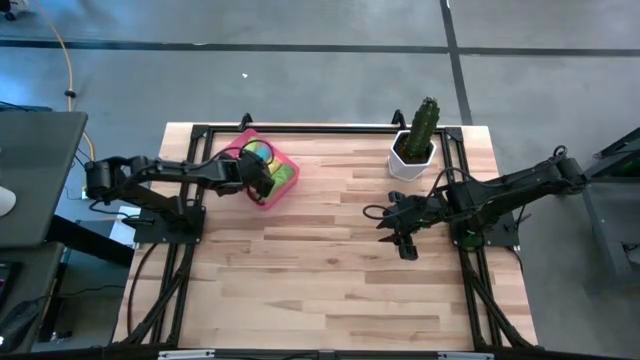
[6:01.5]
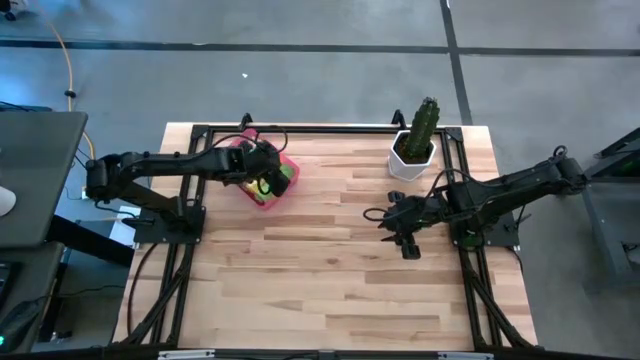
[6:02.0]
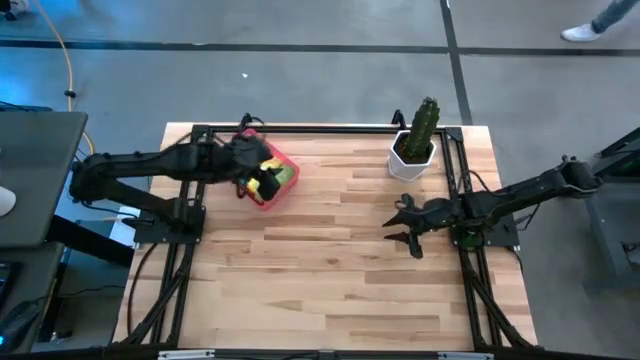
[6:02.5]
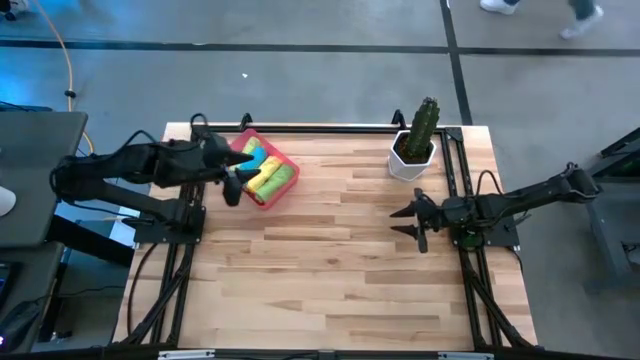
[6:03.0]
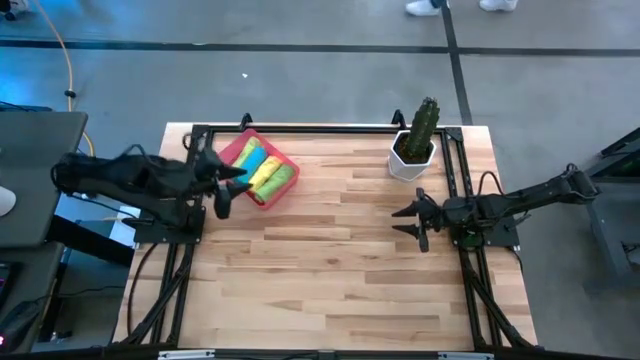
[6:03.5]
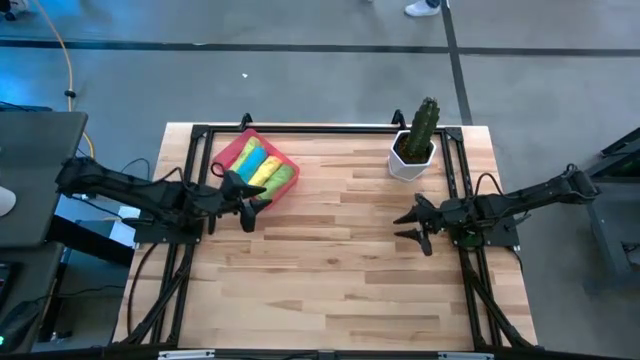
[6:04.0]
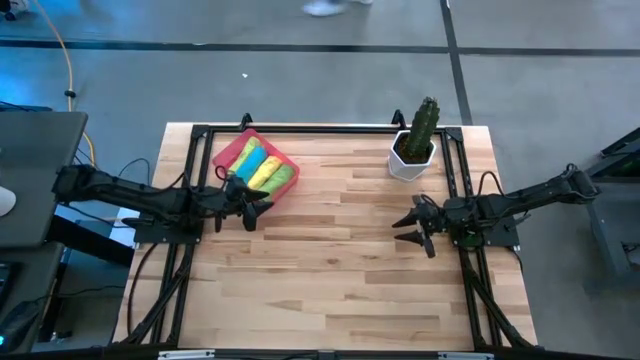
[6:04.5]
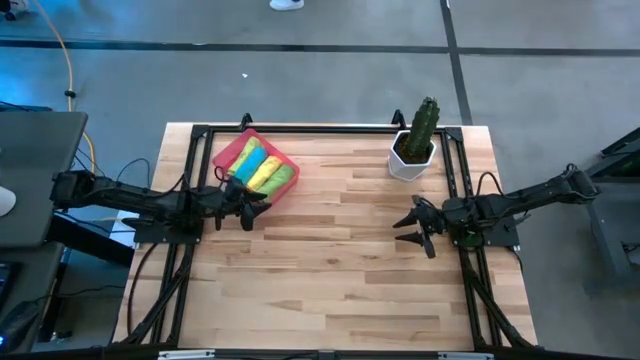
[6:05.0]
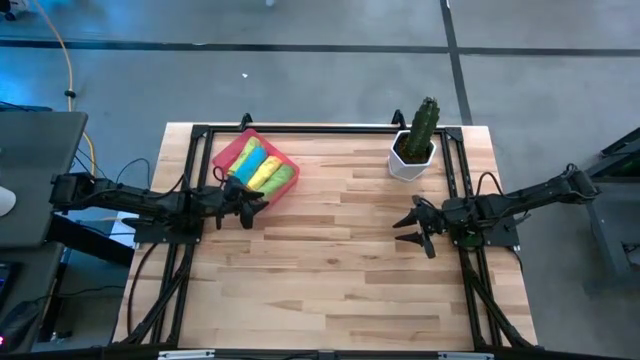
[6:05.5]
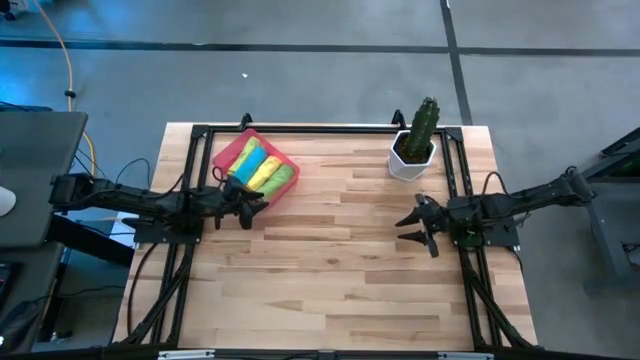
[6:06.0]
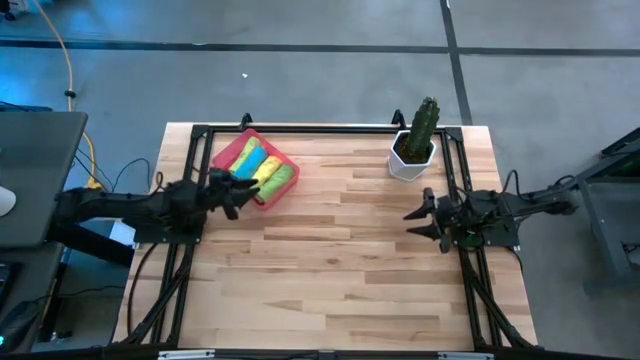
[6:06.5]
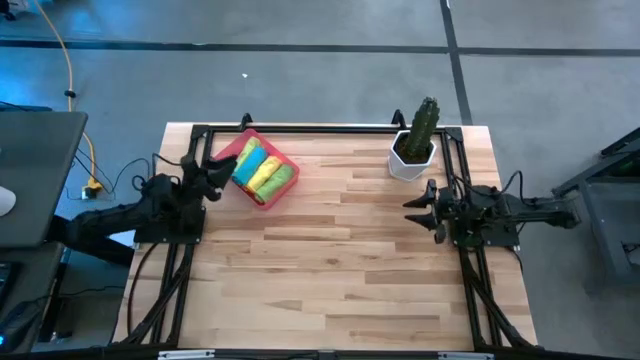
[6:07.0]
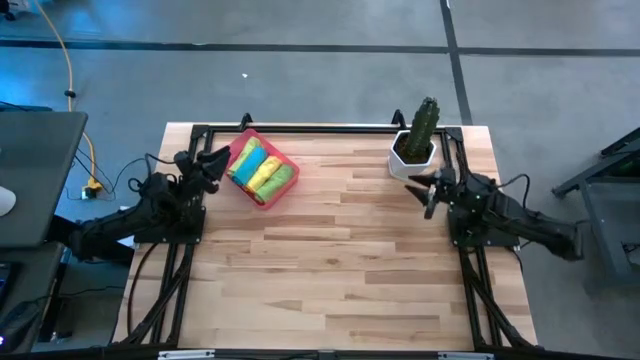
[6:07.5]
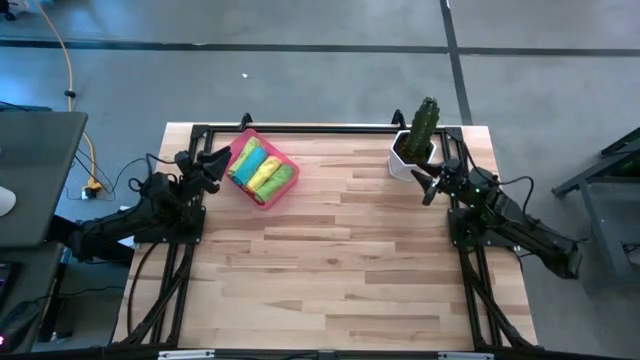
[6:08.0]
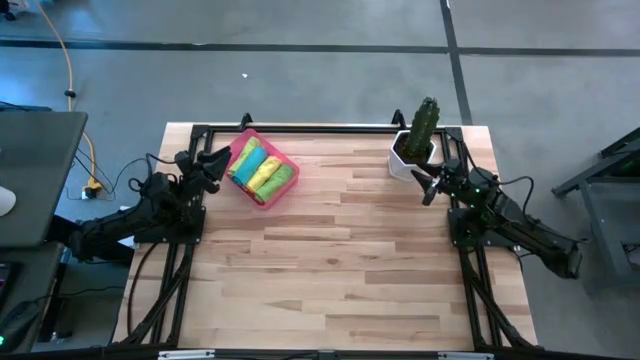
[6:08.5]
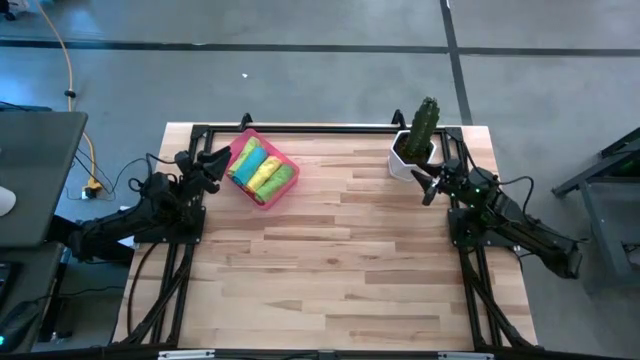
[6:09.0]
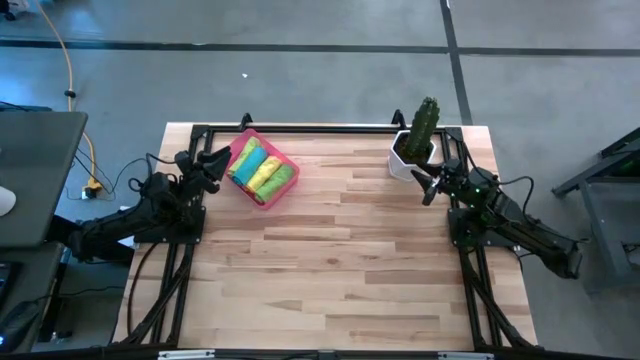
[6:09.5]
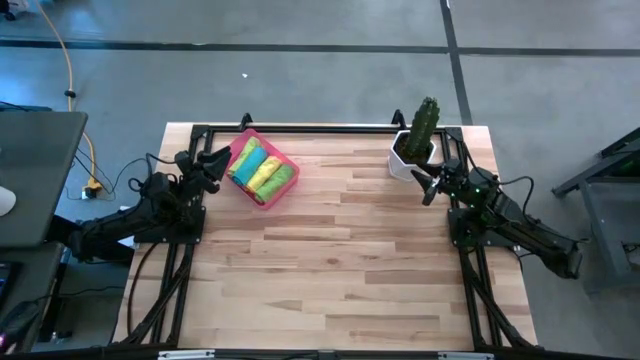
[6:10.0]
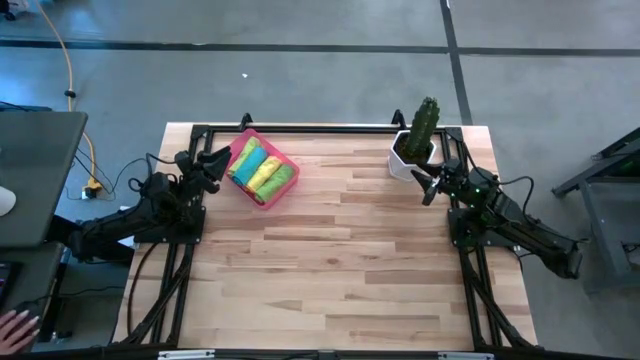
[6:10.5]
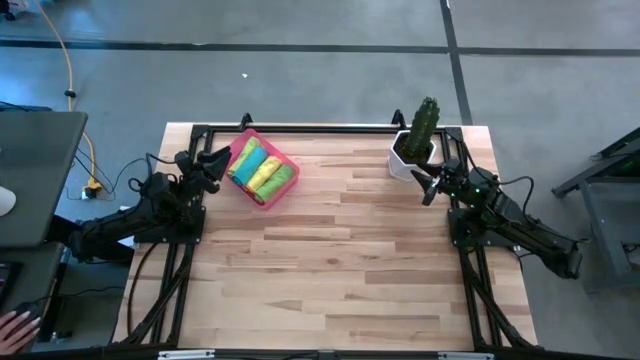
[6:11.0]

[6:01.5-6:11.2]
Task: Roll microfiber towels into tight, uniform cylinder then place into a basket
Return to Home Position

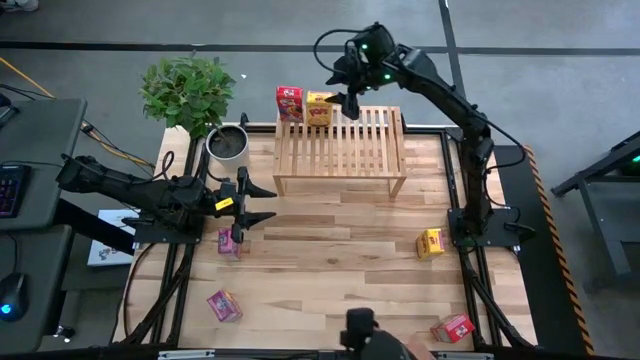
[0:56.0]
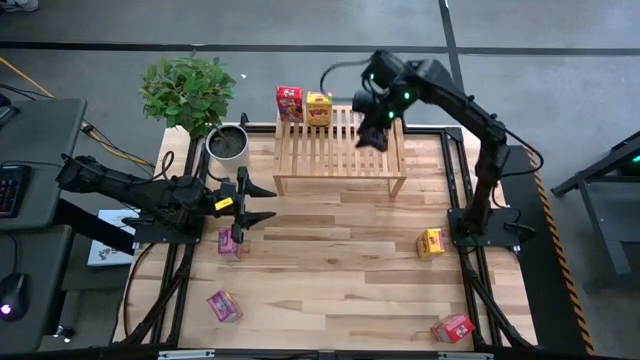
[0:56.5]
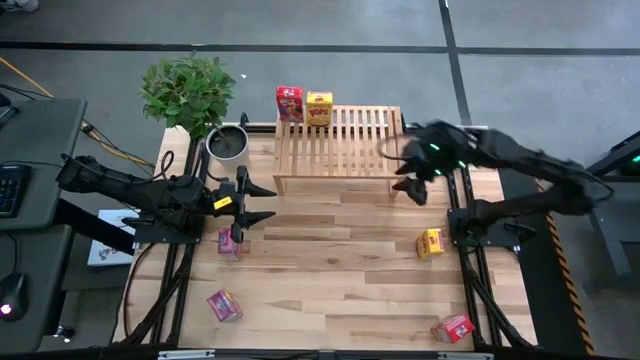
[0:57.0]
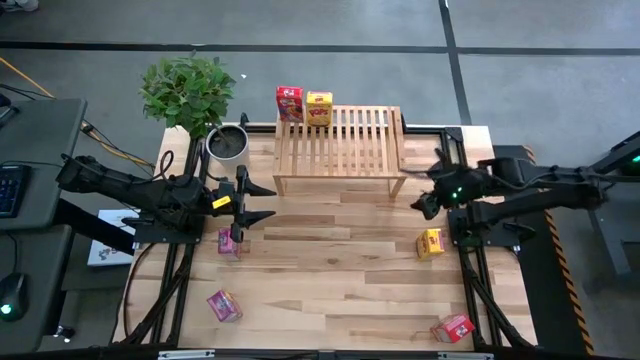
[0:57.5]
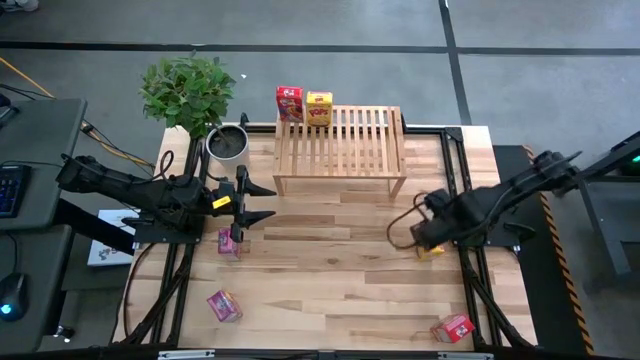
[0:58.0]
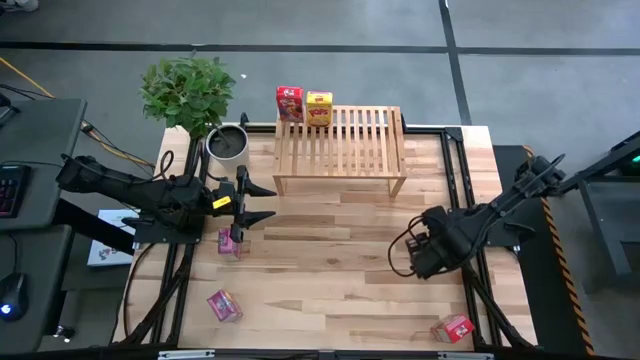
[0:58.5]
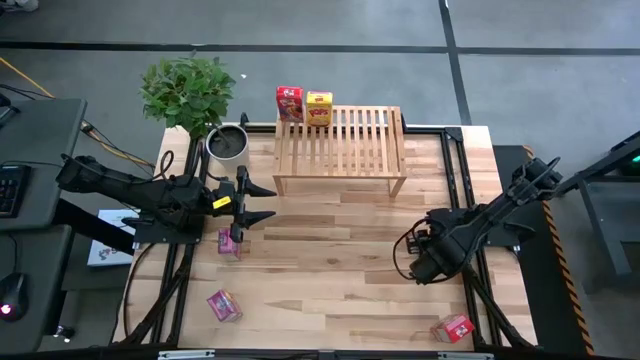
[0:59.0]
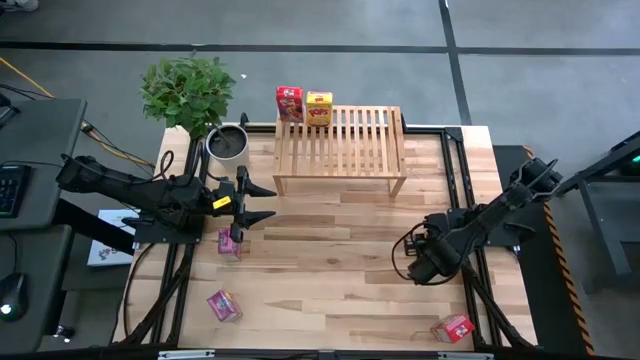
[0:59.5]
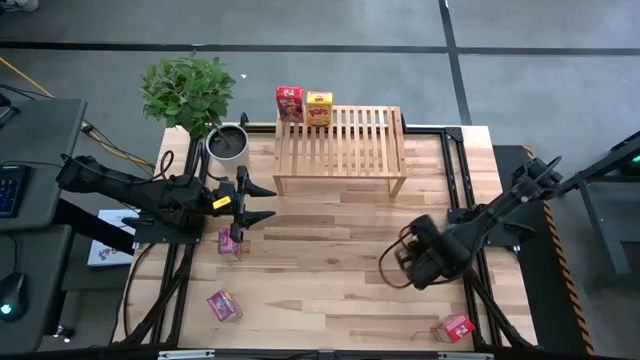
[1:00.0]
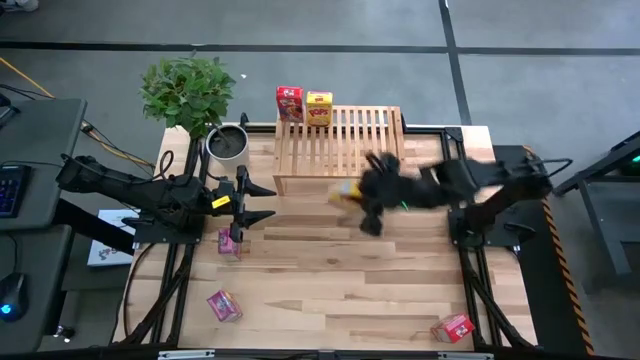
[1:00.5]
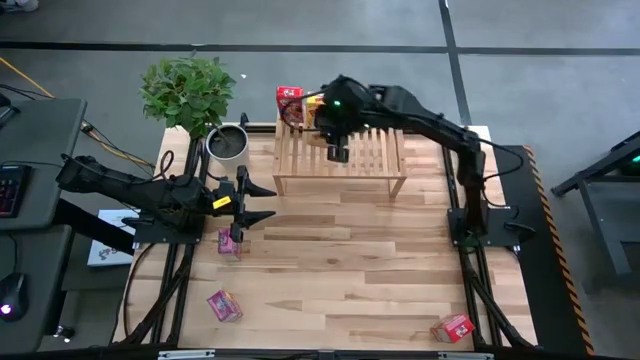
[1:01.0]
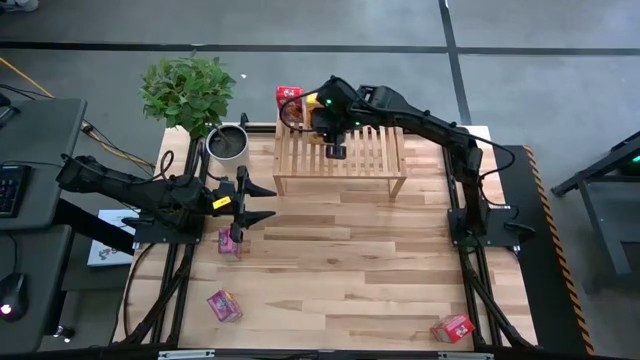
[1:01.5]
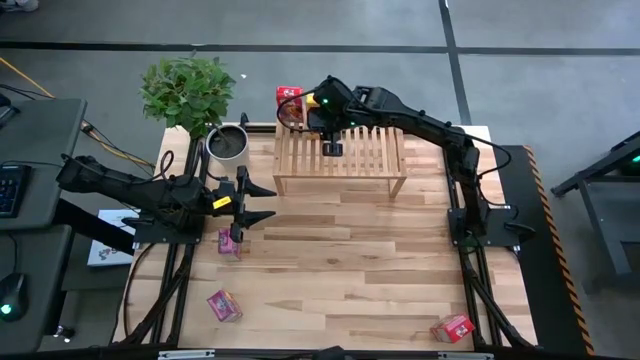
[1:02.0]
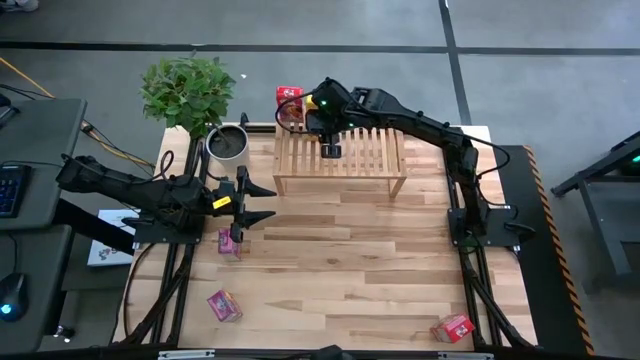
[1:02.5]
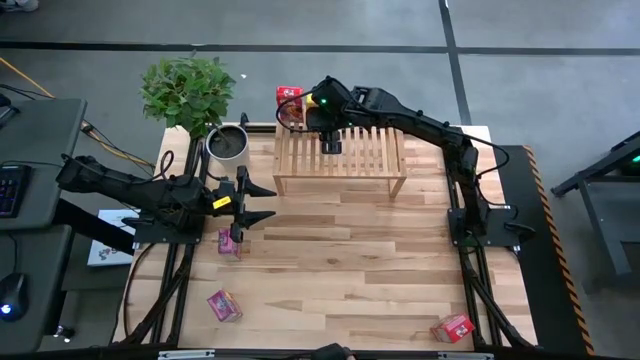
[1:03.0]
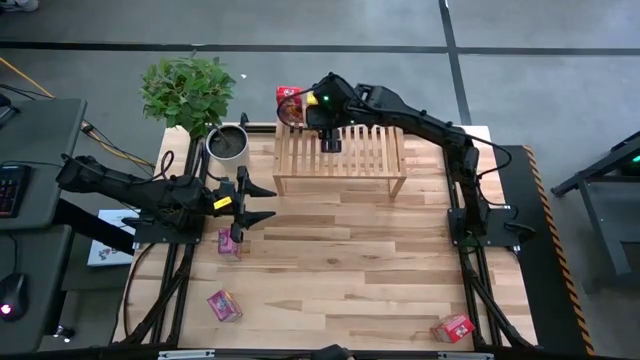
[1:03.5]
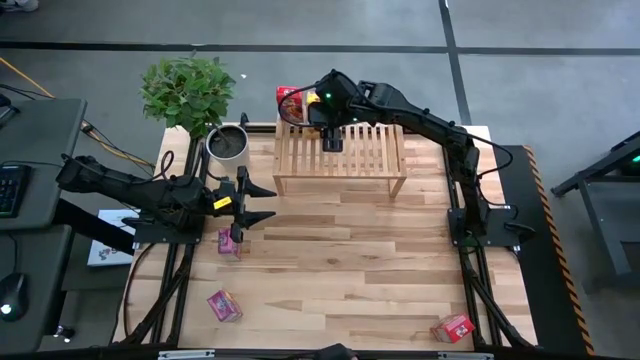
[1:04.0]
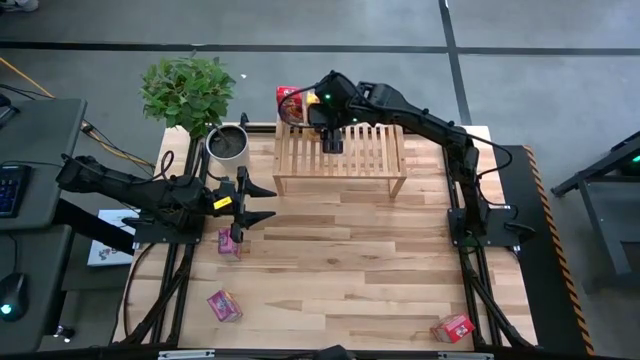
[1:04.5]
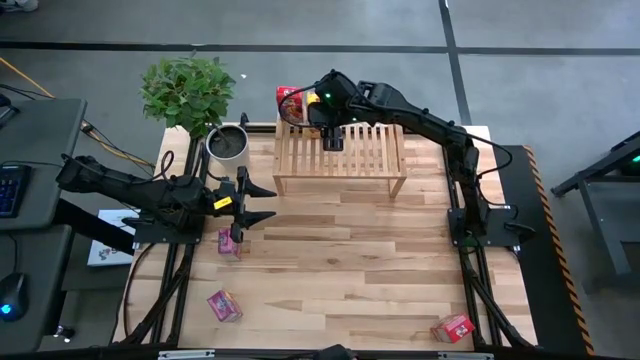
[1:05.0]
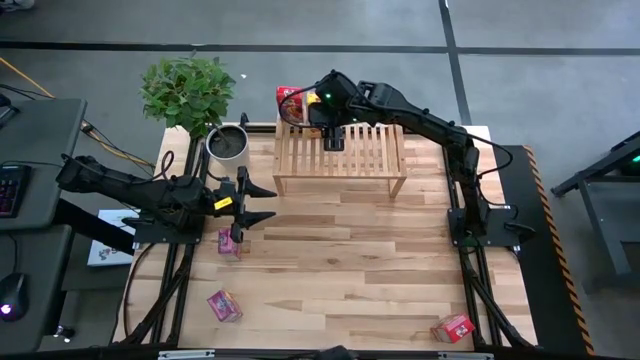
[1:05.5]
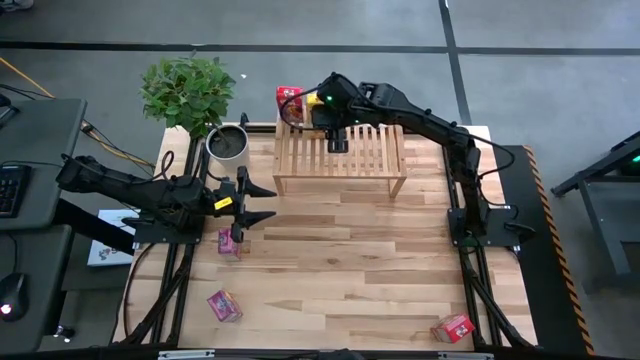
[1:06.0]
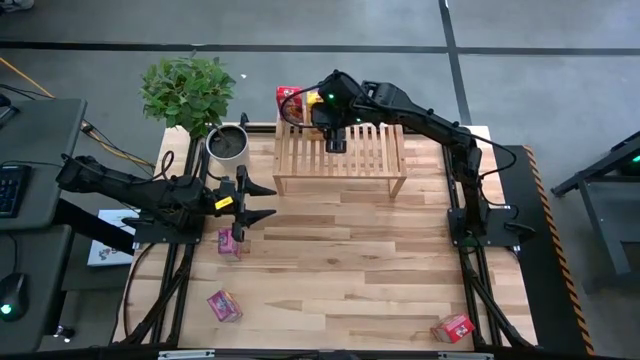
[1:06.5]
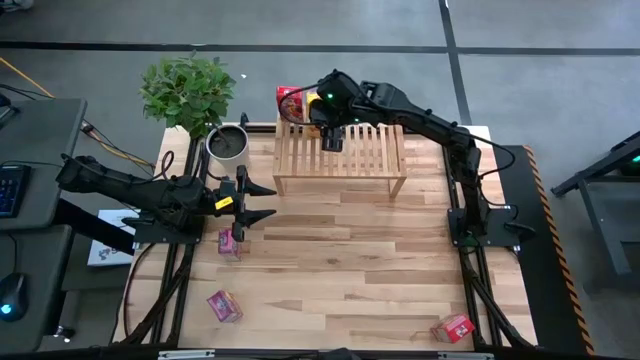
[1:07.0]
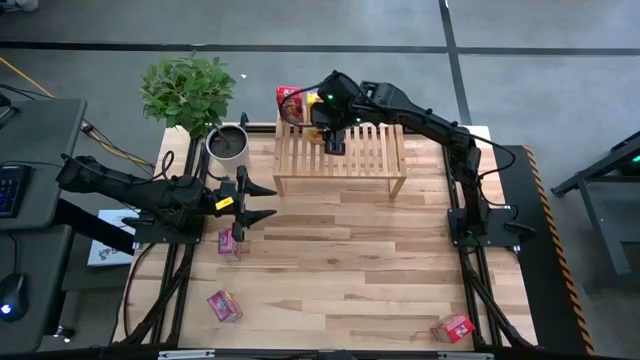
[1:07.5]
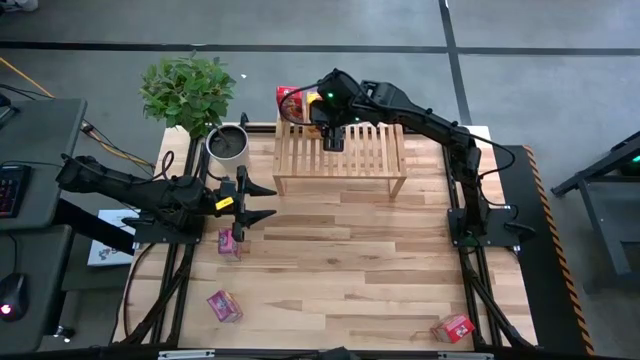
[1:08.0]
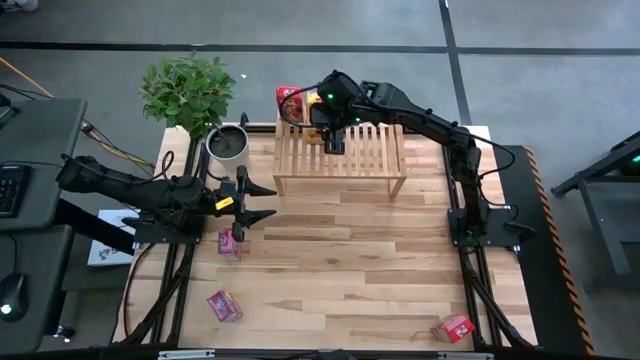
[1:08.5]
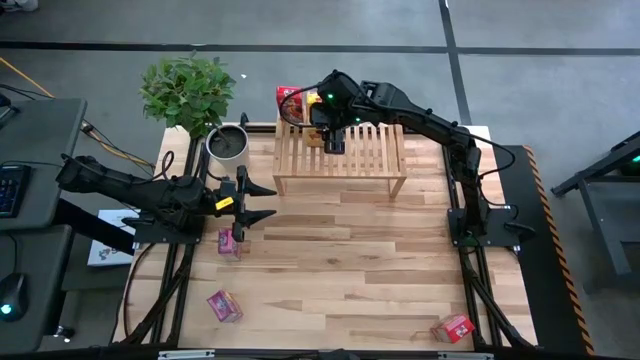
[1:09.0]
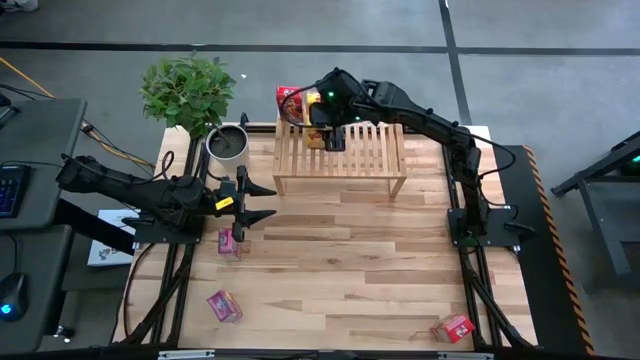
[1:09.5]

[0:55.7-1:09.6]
Task: Stack cereal on shelf
Align the yellow cereal box with the other yellow cereal box on the shelf
